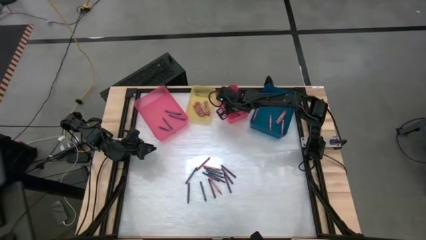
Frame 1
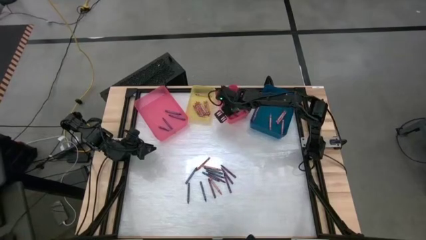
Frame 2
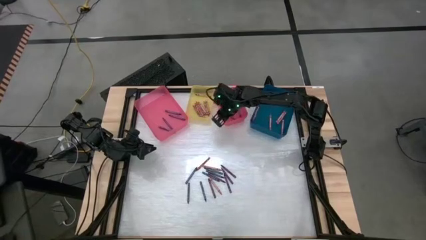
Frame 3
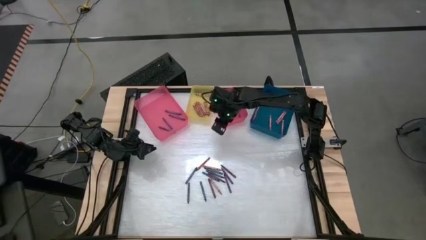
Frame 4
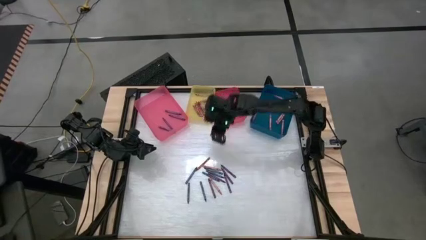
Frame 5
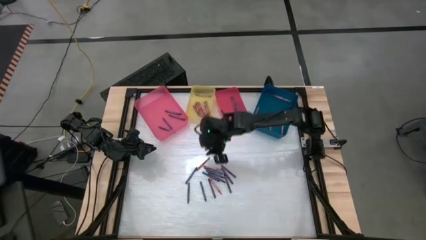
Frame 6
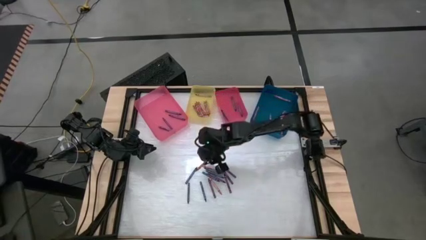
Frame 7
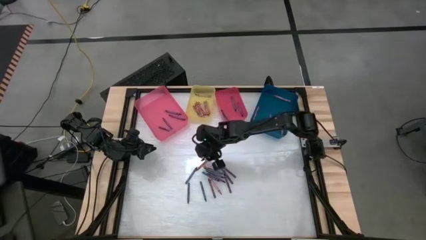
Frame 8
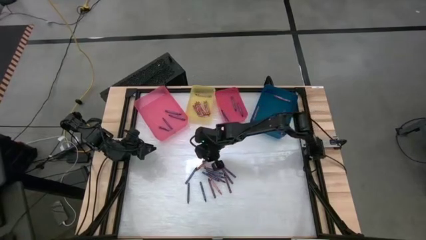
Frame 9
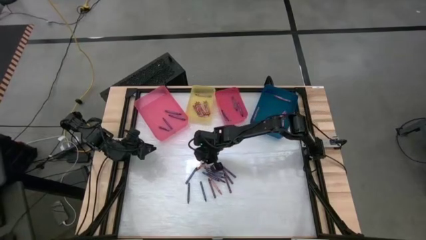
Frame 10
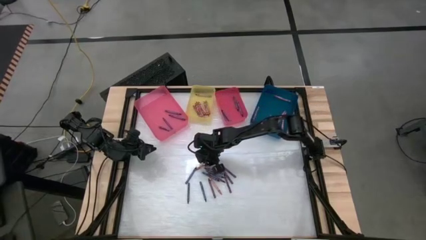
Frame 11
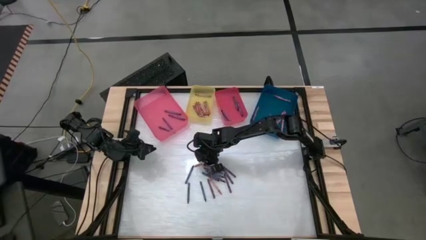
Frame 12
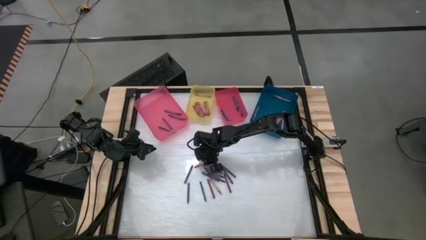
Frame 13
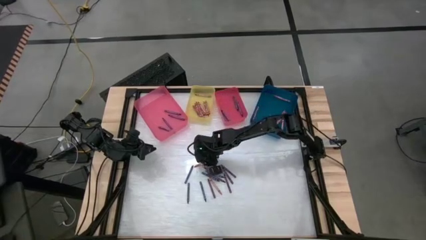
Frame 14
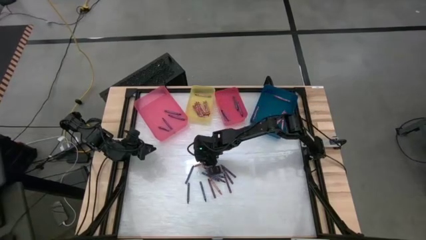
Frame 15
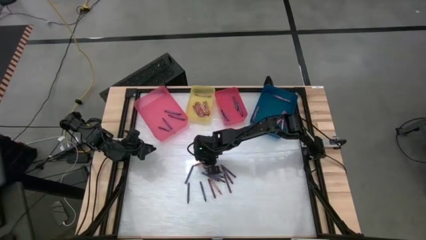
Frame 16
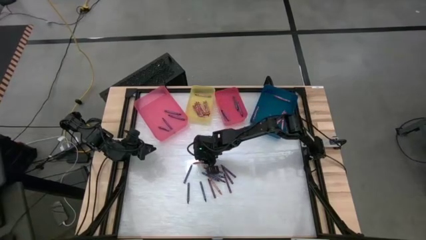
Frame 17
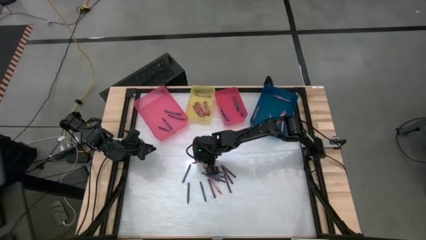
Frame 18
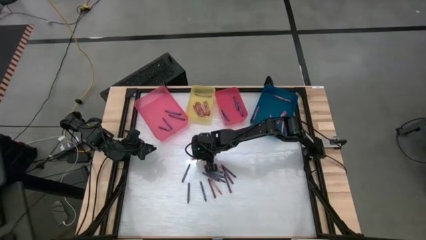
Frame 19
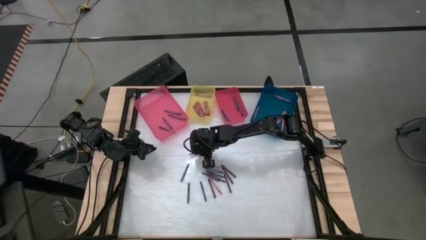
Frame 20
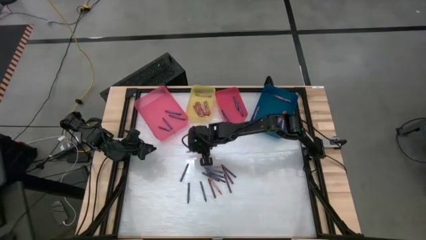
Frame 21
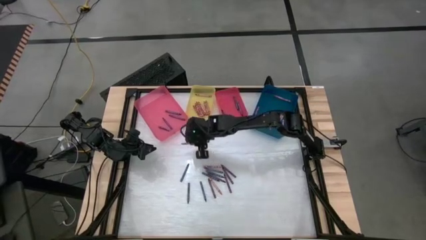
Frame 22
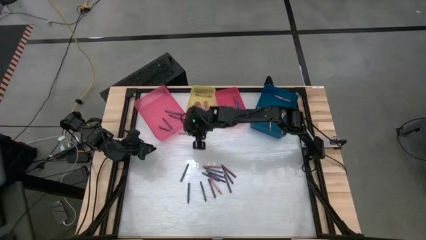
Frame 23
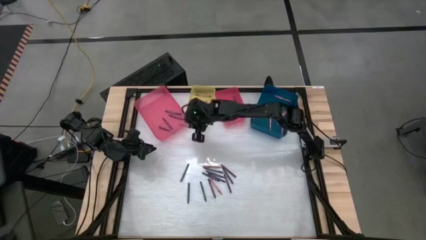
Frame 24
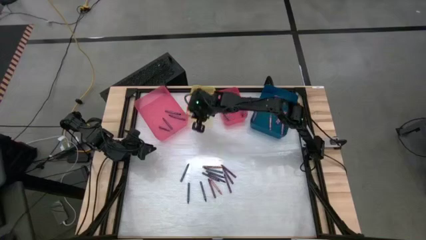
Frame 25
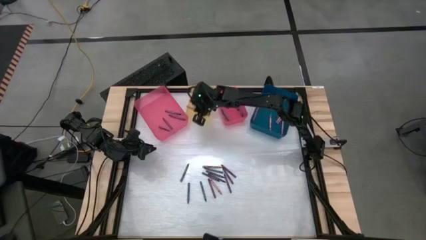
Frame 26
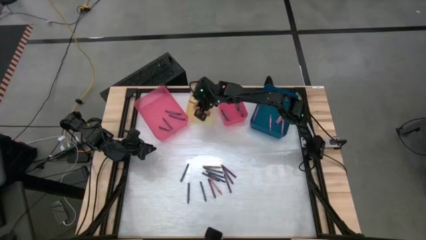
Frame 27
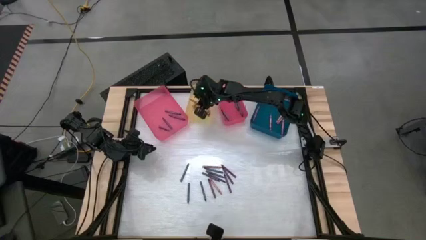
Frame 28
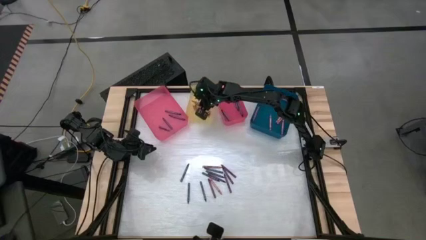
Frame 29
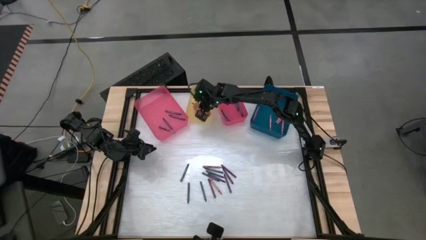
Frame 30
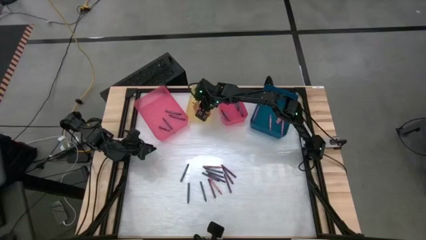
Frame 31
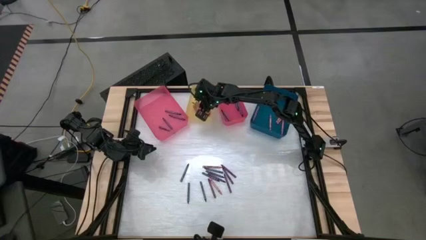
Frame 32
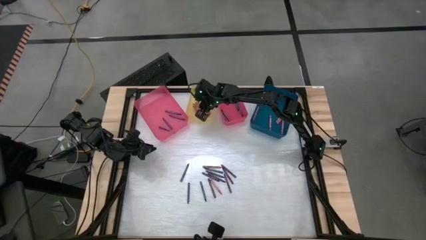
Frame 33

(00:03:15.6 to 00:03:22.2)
Task: Sort crayons
Put the red crayon into the yellow bin

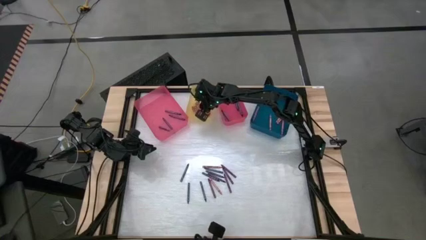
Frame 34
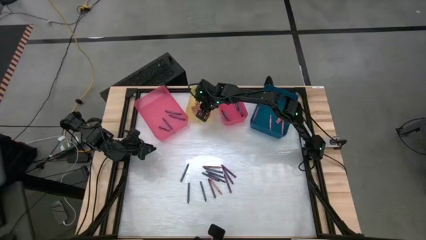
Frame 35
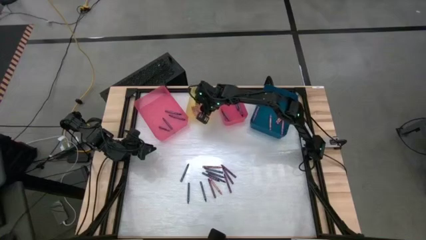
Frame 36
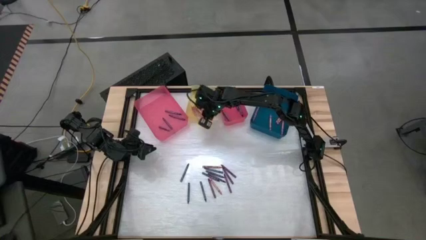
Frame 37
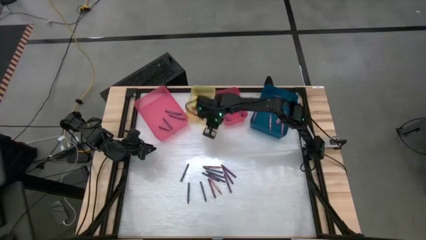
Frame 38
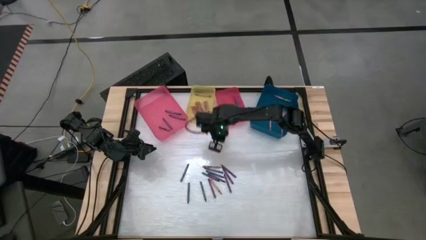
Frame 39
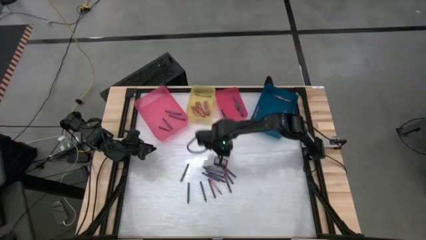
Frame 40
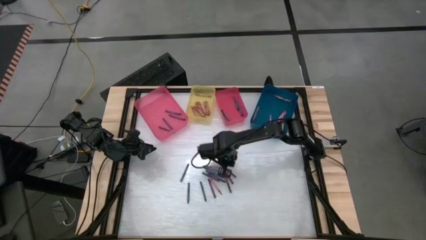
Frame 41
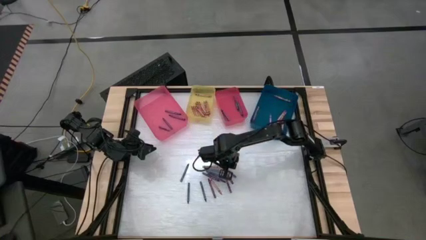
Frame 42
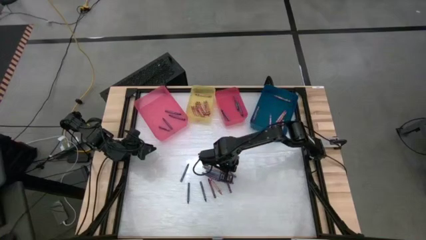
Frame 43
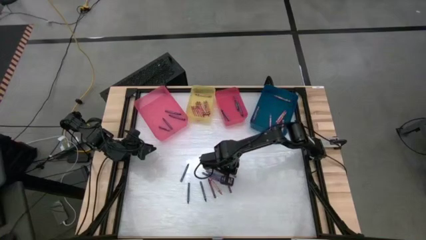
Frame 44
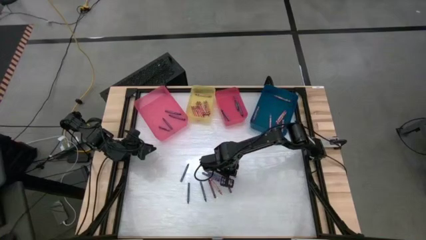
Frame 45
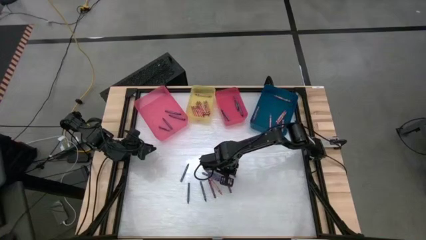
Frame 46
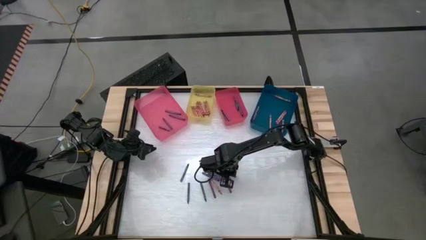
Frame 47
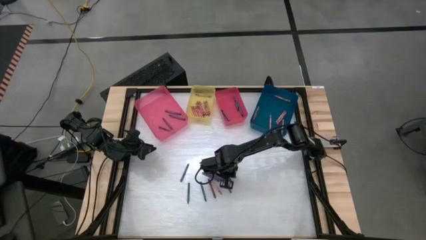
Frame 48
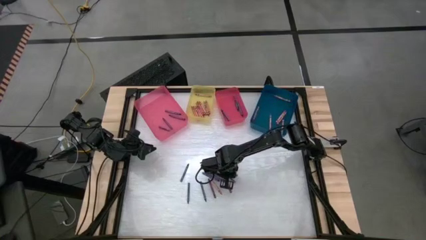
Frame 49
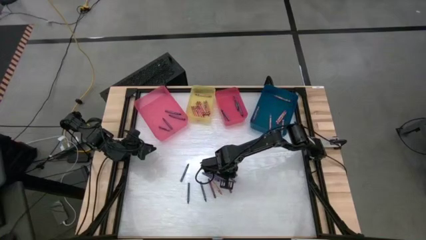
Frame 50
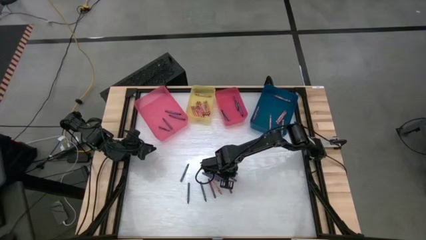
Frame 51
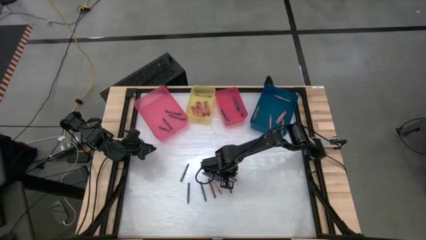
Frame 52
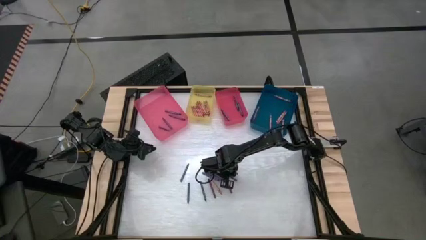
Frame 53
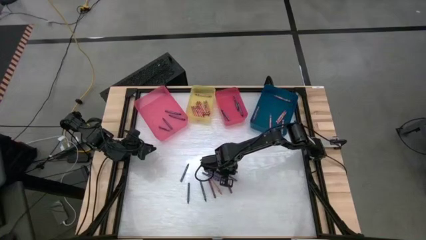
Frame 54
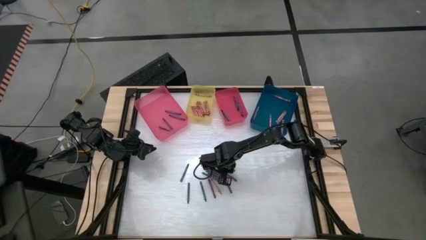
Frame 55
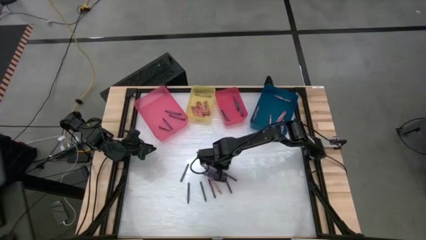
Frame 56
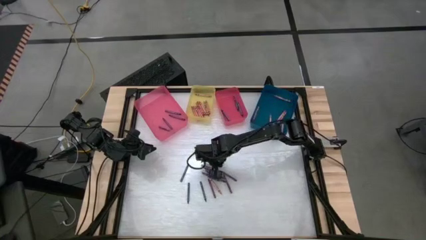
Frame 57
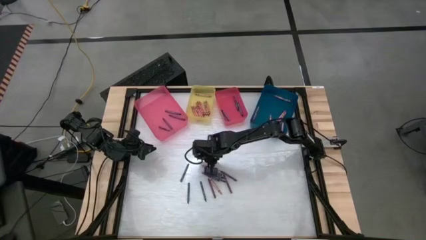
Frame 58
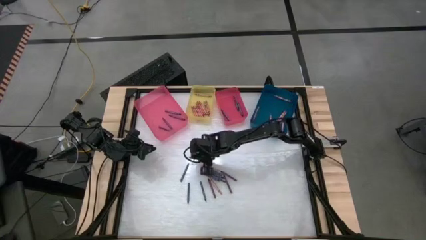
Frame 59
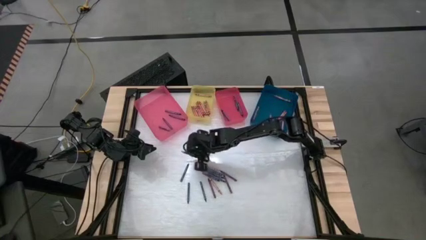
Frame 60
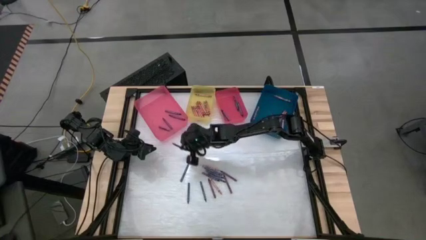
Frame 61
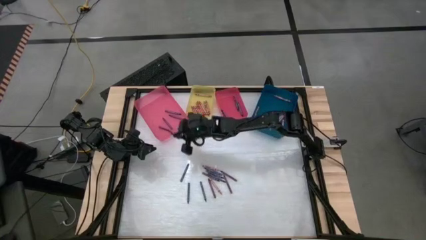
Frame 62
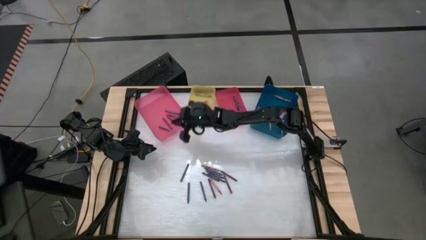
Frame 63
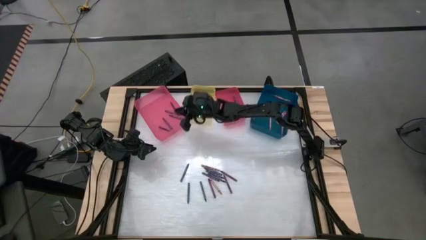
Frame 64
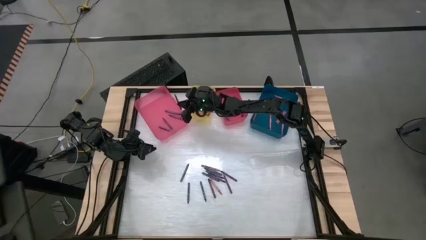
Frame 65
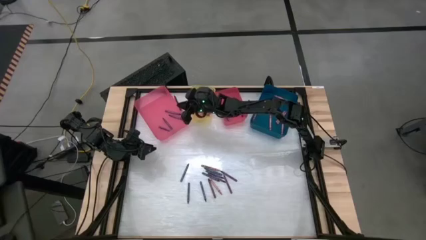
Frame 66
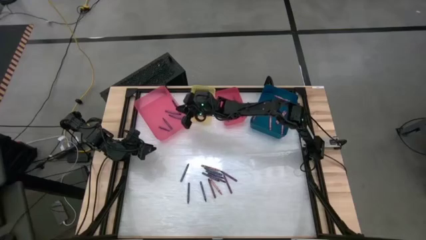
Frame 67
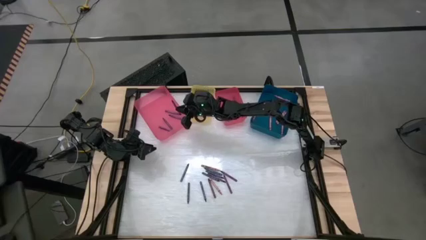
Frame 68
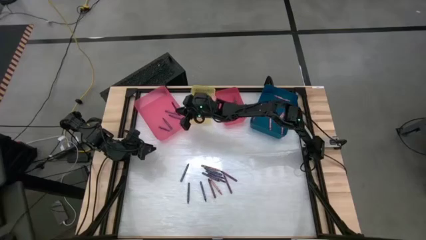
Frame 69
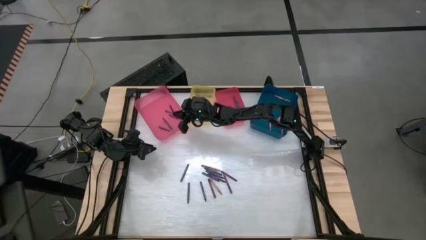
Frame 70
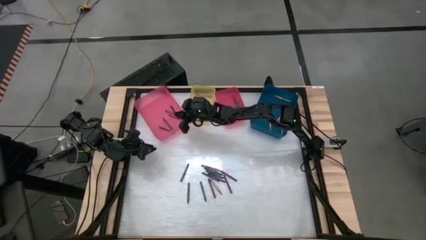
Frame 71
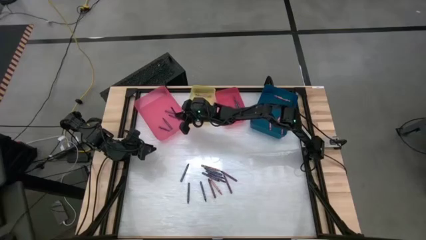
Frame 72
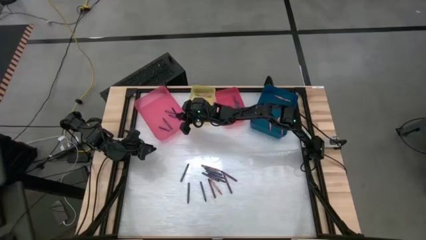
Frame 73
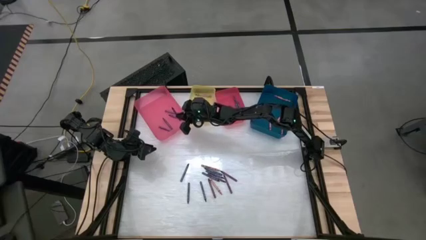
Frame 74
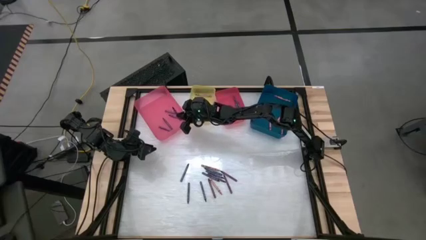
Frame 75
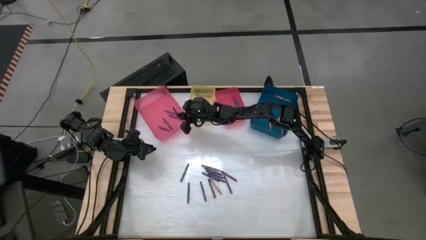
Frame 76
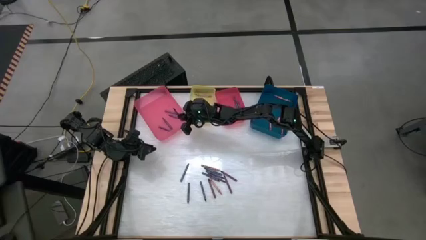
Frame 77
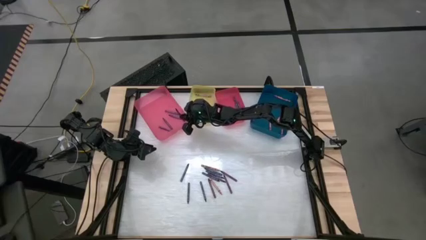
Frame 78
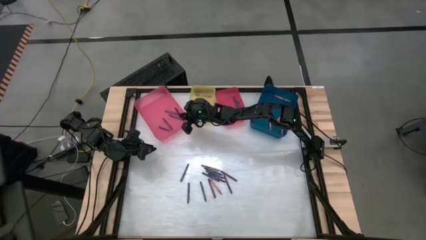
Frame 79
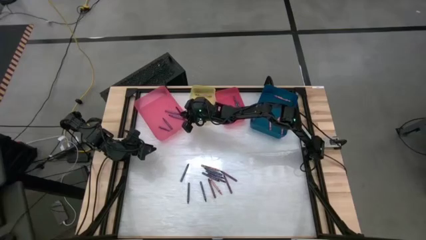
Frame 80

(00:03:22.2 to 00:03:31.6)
Put the violet crayon into the pink bin
